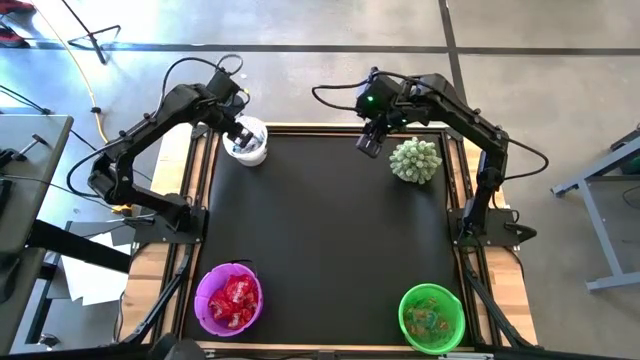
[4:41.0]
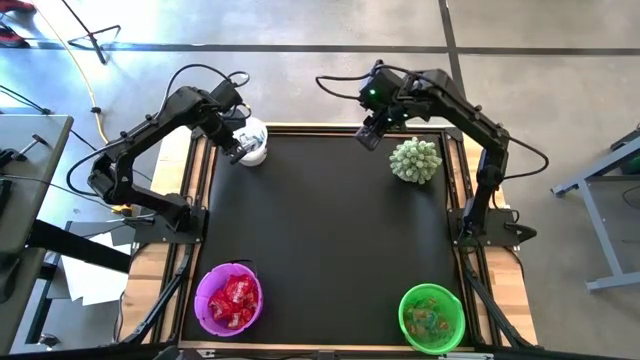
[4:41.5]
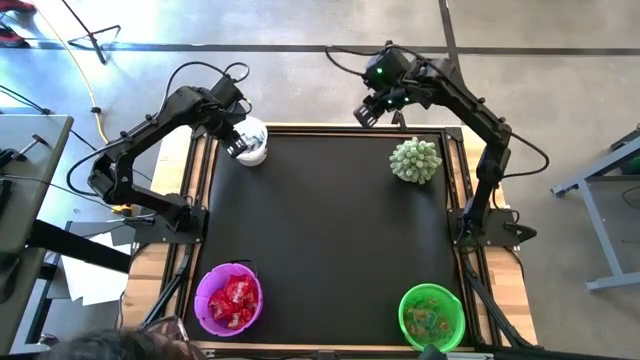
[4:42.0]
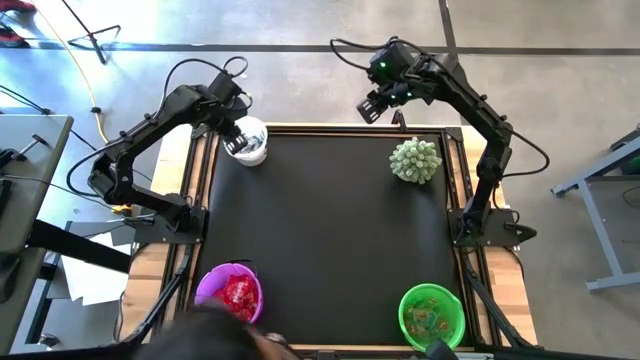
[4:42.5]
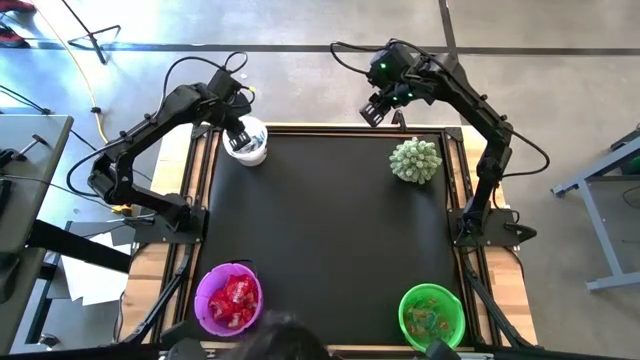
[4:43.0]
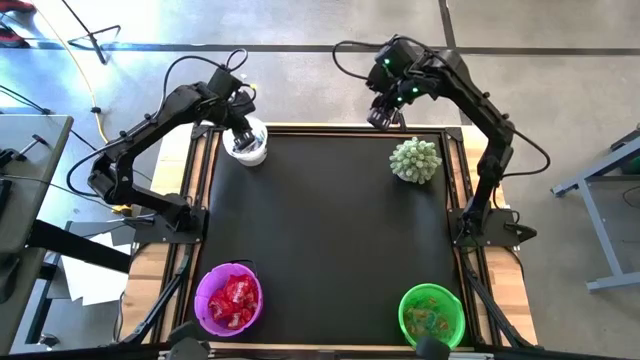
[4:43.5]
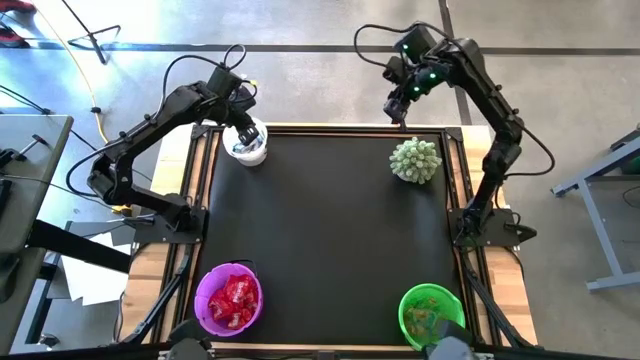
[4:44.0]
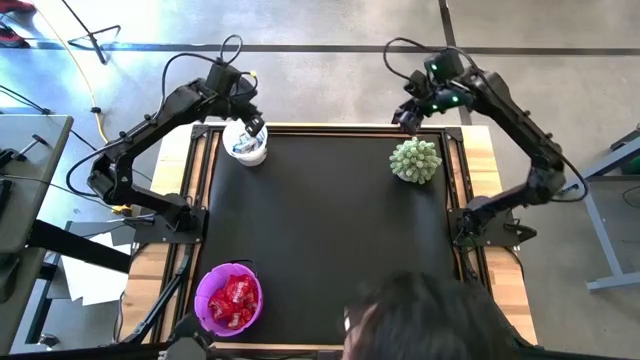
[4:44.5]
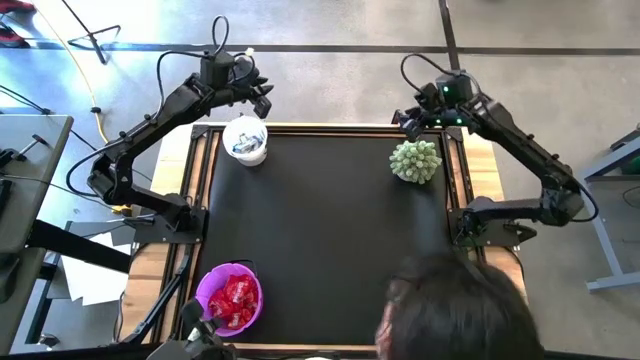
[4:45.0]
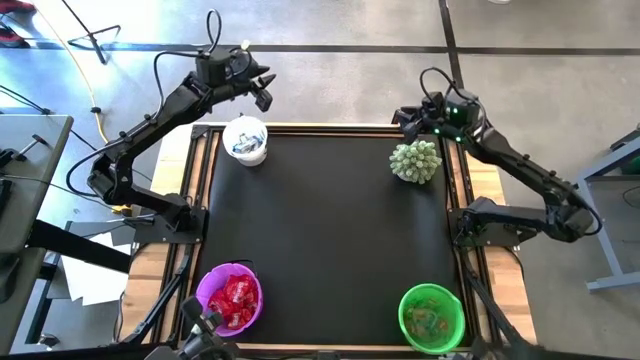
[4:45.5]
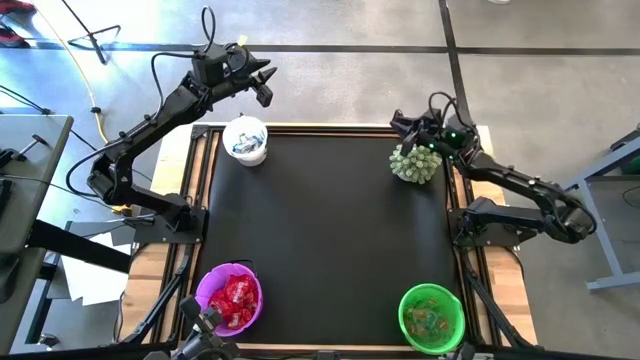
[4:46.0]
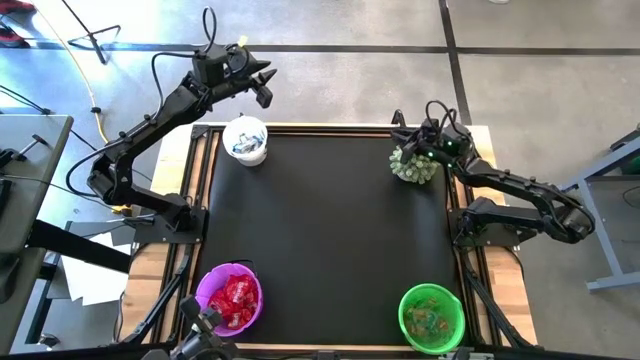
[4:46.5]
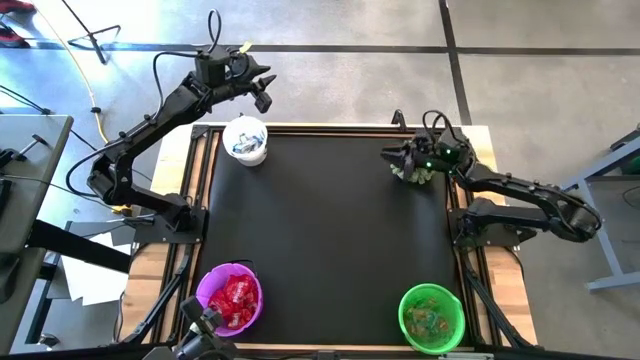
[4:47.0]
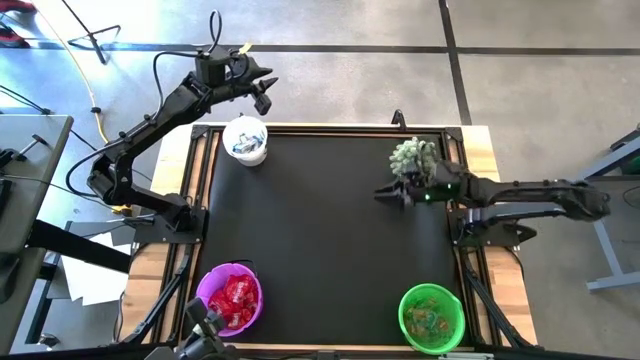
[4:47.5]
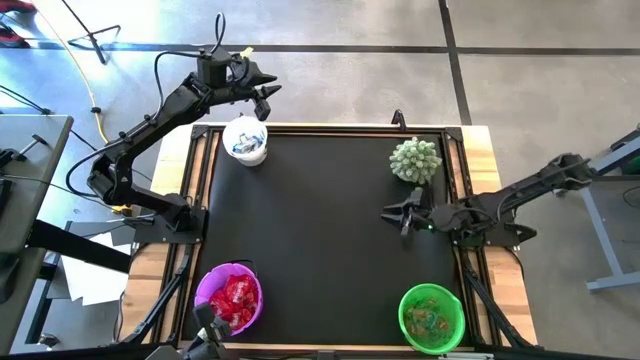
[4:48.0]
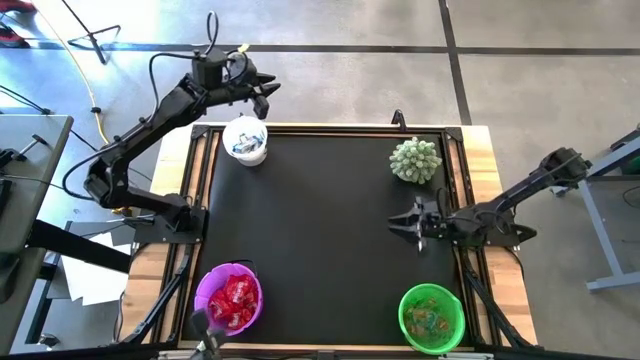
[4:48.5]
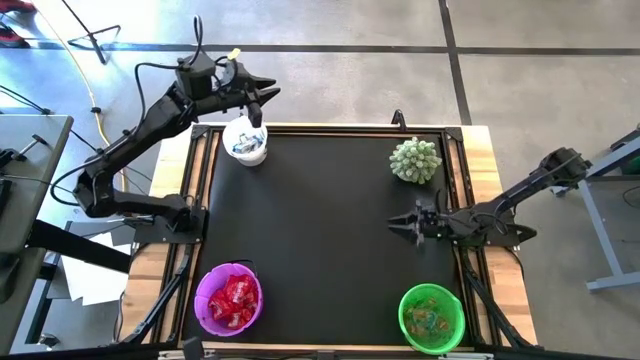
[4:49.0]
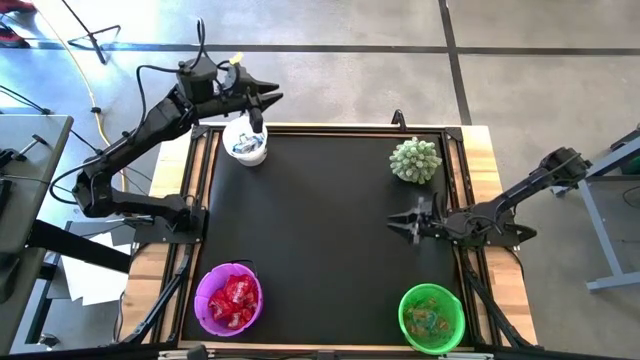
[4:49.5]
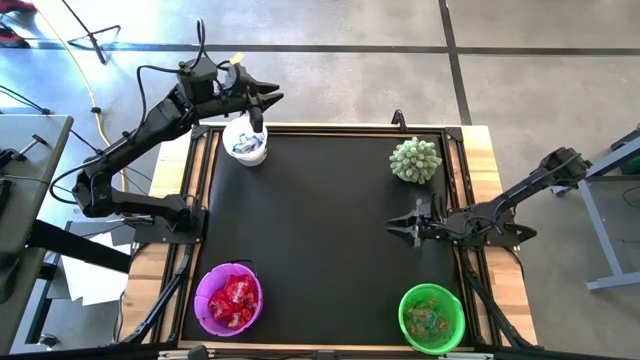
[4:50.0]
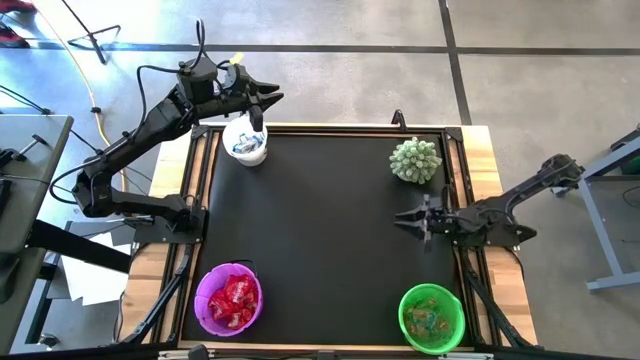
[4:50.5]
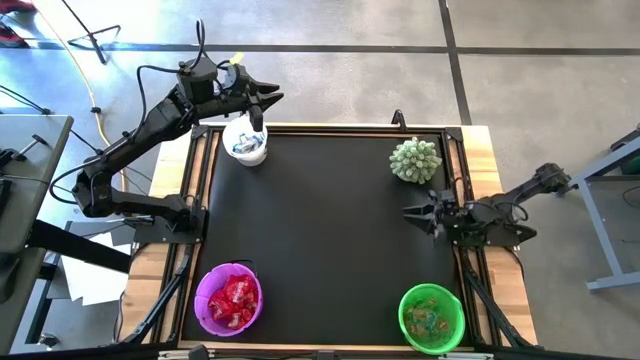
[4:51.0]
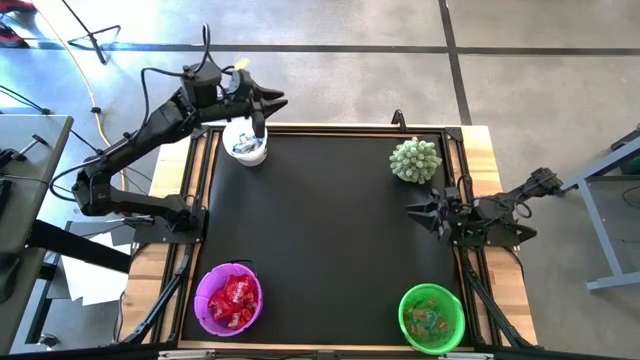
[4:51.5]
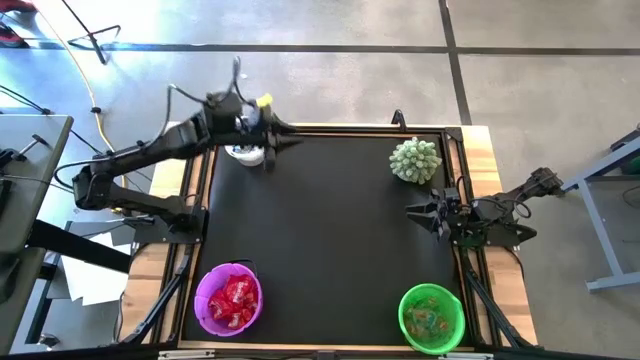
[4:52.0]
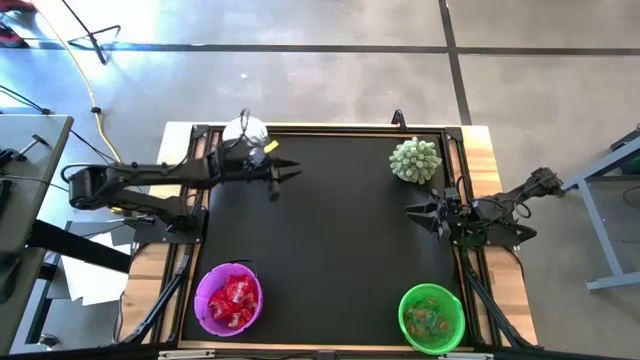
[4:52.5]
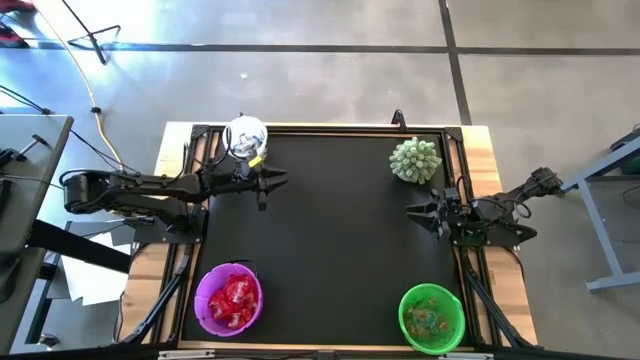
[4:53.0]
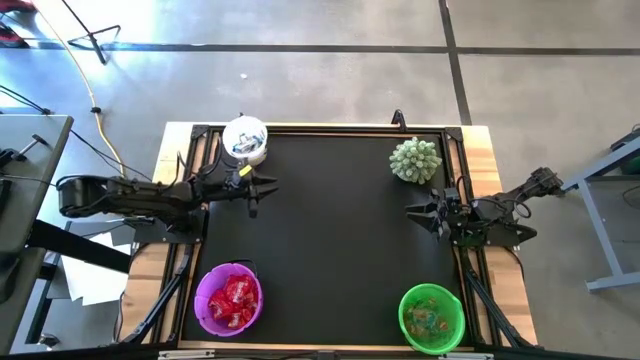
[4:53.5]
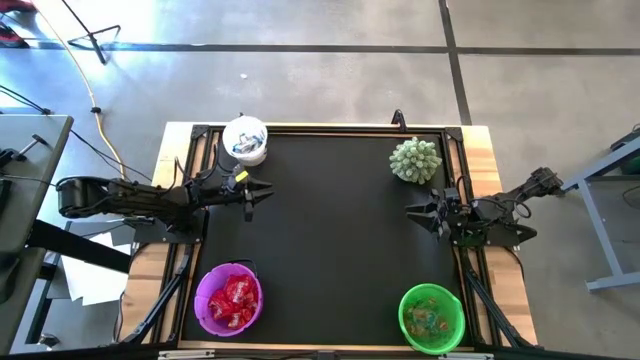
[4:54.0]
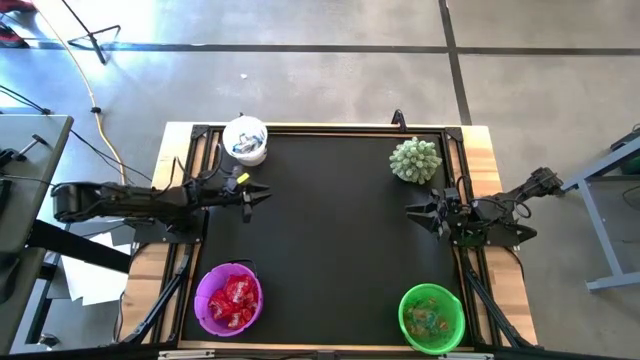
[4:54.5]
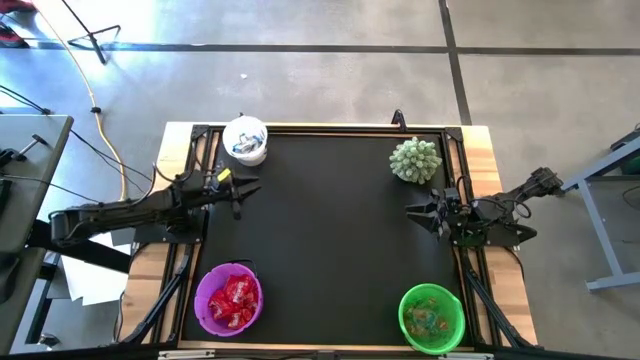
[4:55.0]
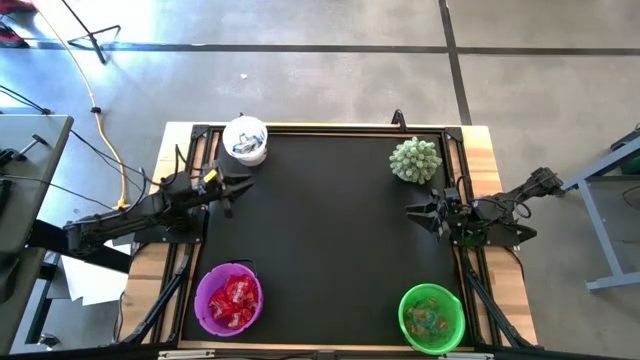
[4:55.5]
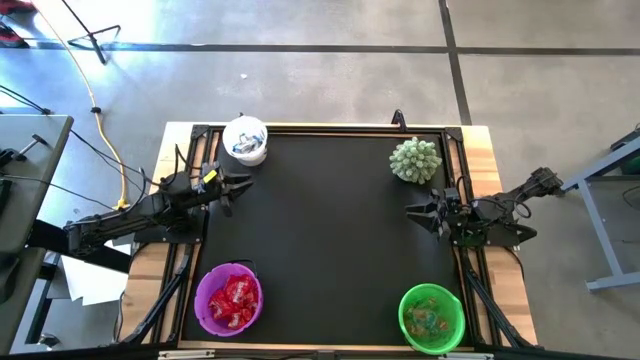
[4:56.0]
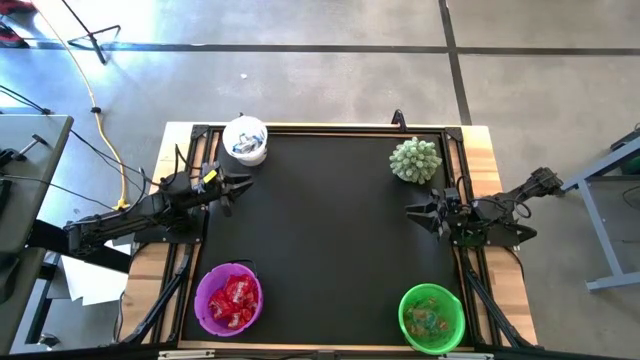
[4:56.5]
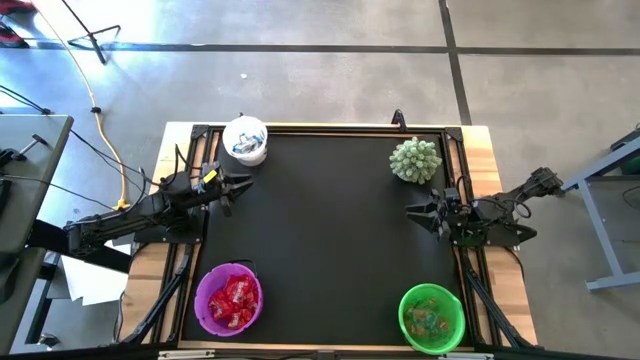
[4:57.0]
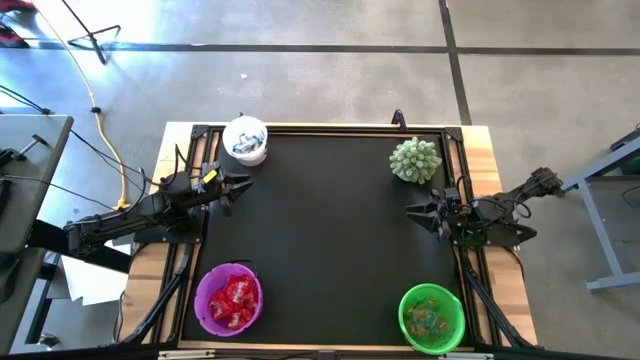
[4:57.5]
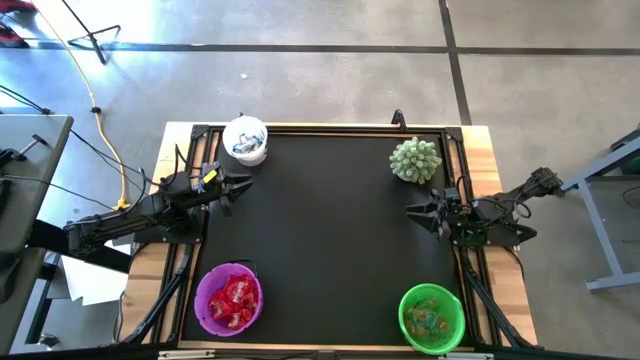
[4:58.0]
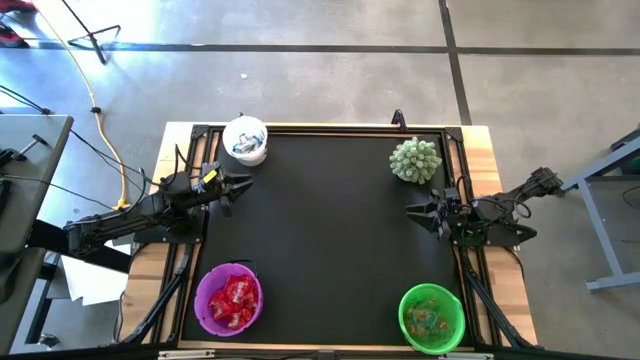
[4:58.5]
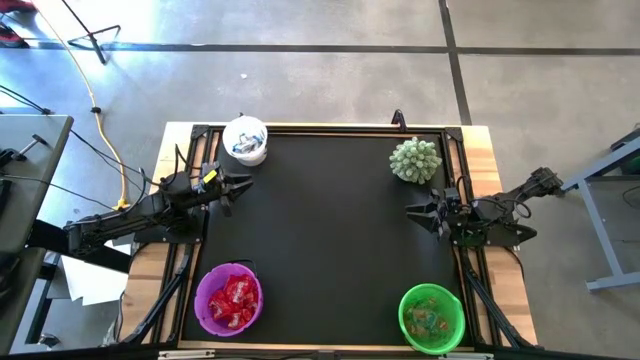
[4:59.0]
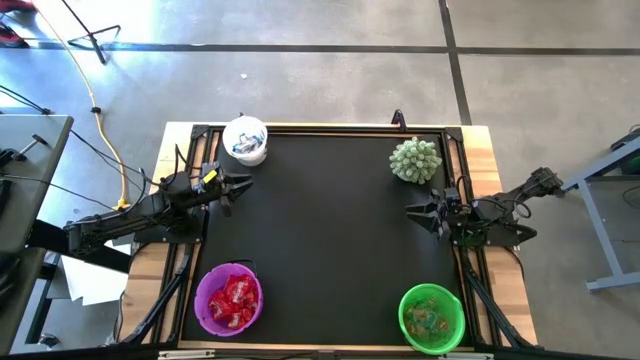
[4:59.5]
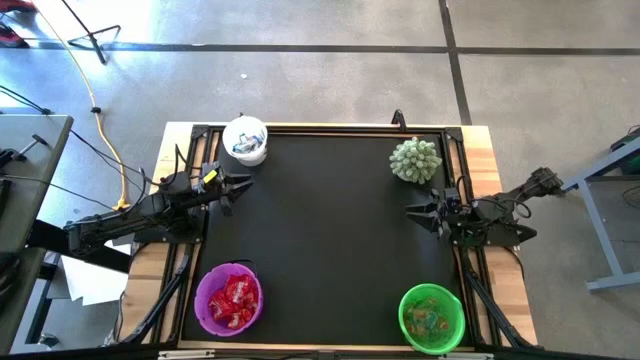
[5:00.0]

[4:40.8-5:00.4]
Task: Sort candy
Return to Home Position
